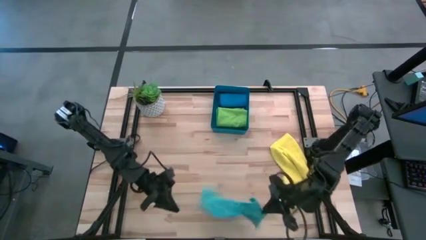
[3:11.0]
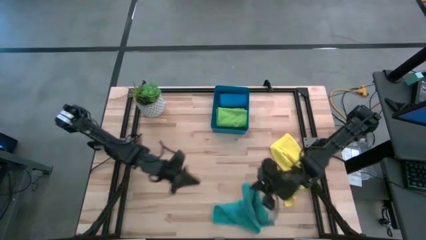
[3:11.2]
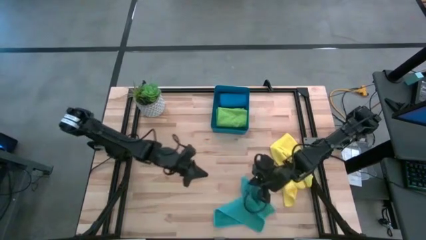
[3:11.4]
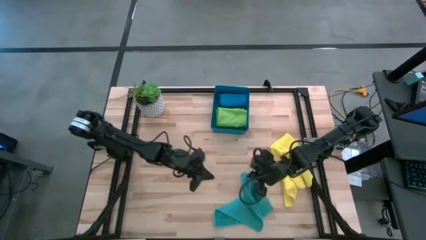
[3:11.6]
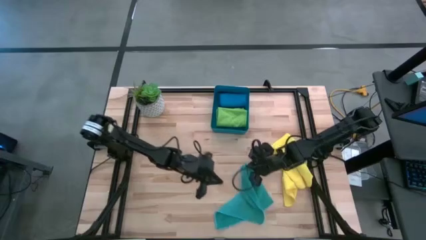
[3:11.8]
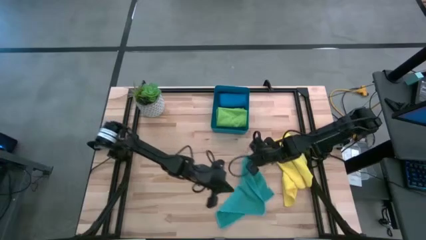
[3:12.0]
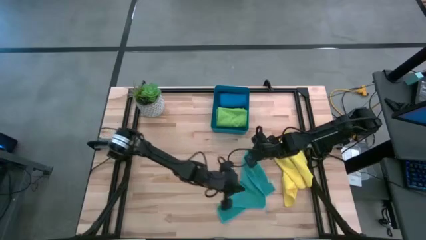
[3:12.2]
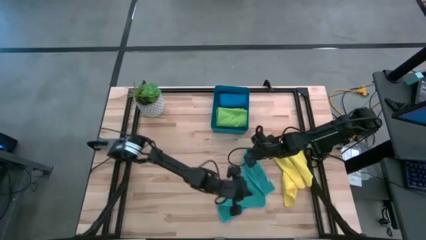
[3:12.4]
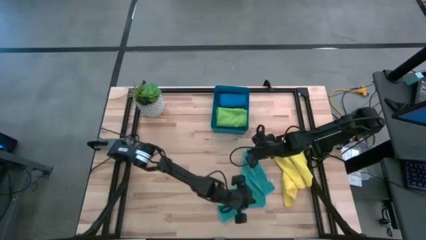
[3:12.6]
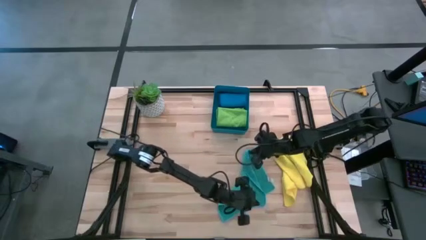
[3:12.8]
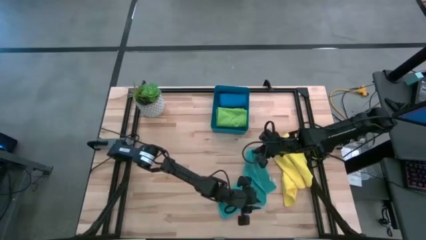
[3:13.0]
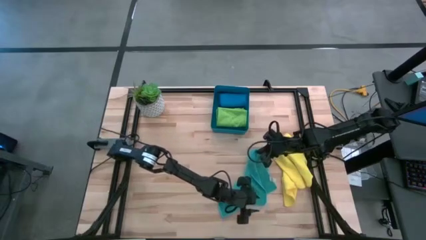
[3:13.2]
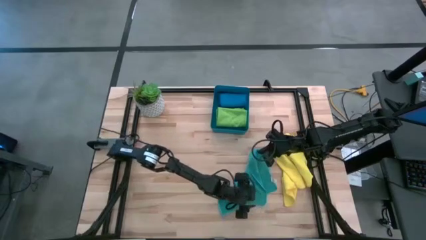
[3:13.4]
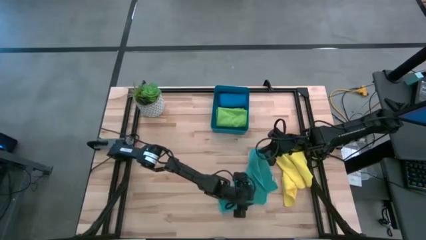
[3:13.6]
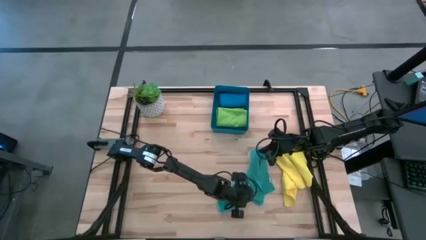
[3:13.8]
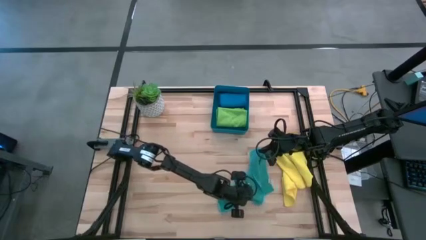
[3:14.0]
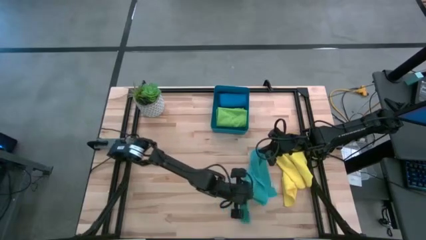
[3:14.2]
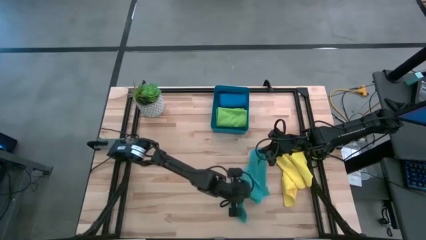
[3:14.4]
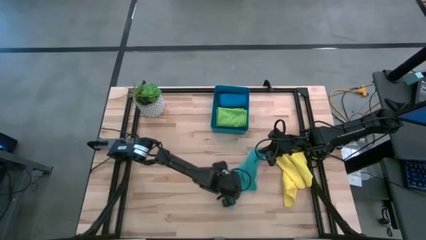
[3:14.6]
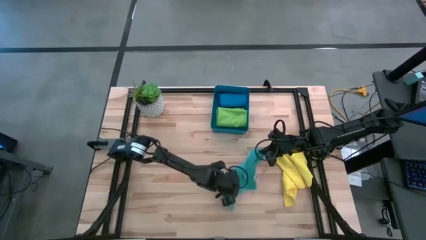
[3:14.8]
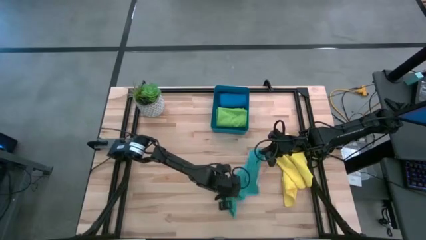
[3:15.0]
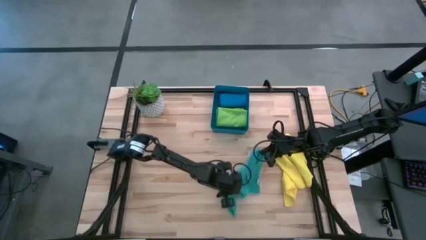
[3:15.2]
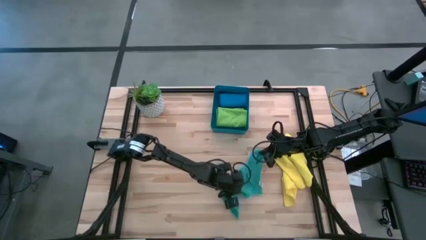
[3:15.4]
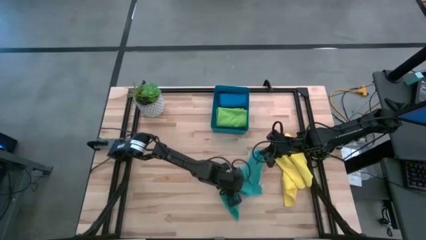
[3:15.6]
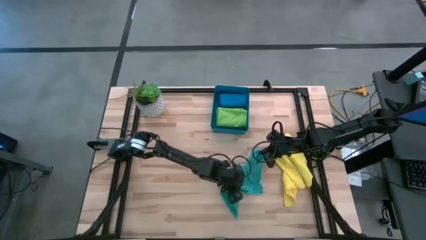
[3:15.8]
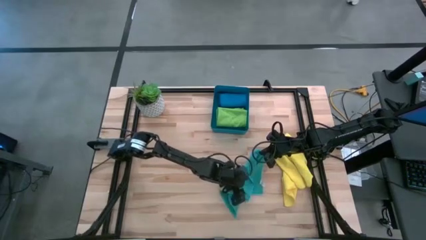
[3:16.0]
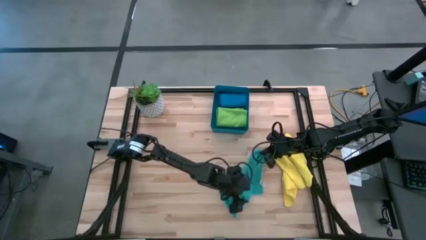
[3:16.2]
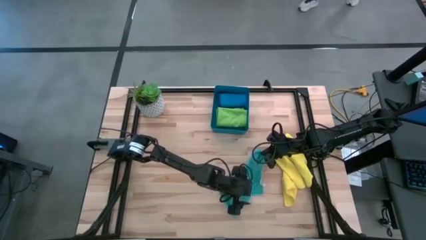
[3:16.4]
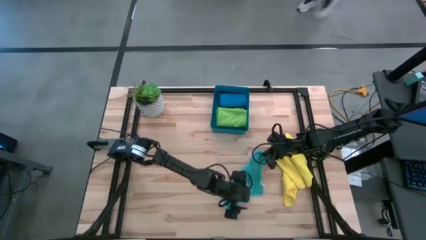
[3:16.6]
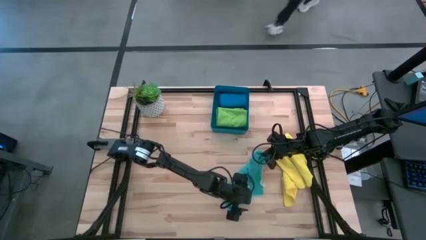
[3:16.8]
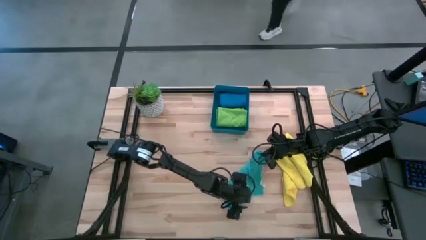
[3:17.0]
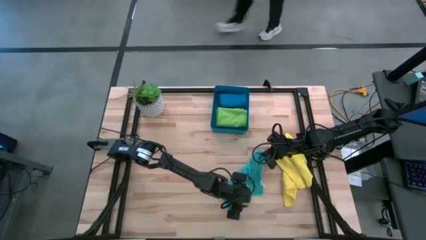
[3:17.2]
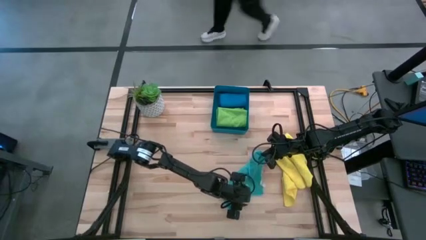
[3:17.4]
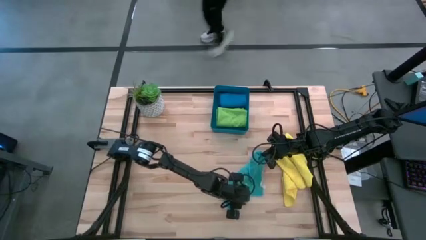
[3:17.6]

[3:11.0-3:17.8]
Task: Fold microfiber towels
Fold the light blue microfiber cloth

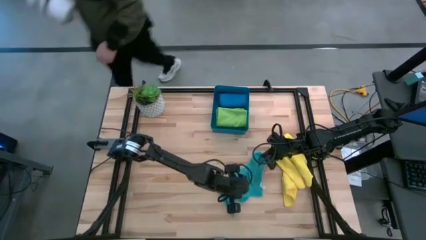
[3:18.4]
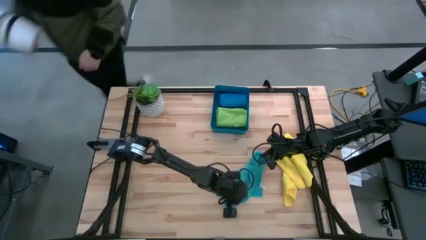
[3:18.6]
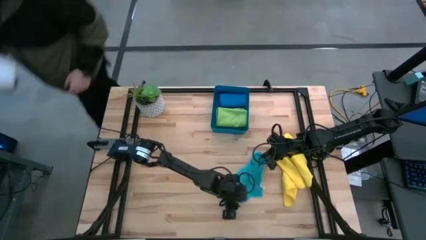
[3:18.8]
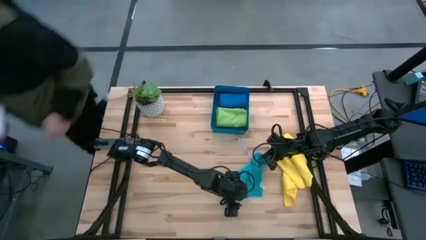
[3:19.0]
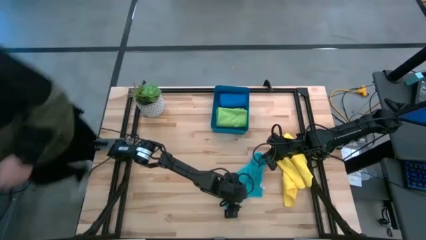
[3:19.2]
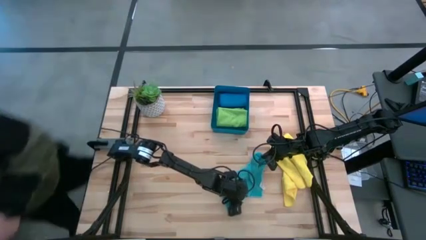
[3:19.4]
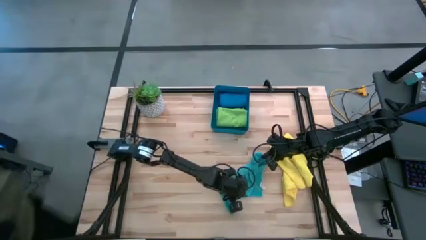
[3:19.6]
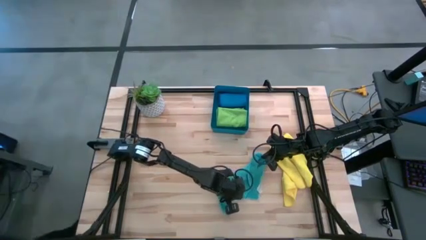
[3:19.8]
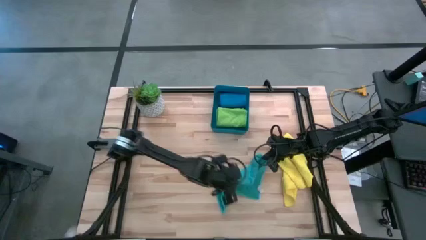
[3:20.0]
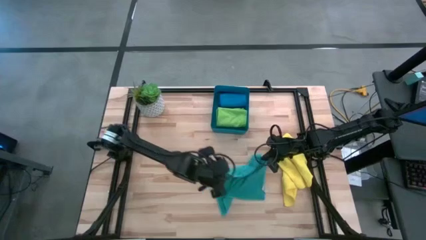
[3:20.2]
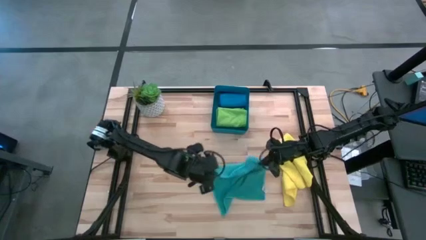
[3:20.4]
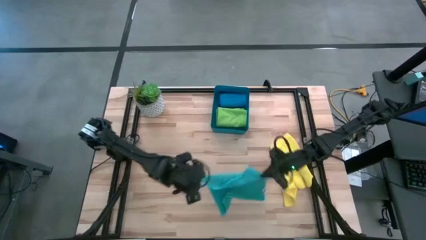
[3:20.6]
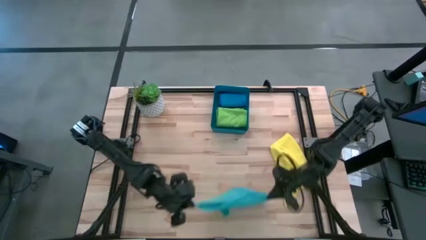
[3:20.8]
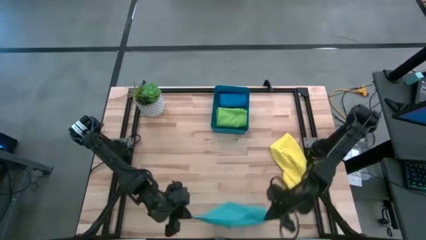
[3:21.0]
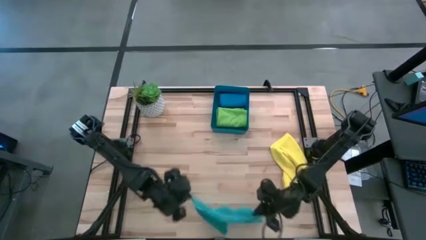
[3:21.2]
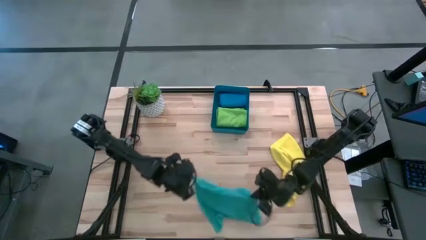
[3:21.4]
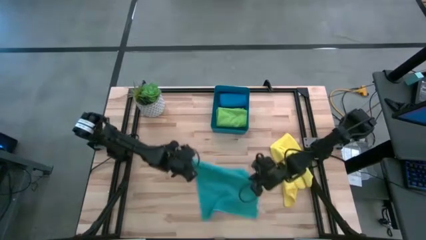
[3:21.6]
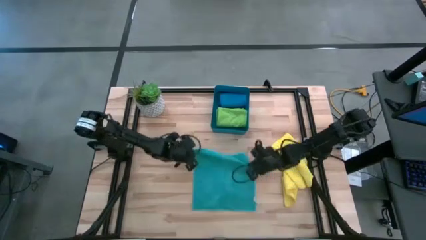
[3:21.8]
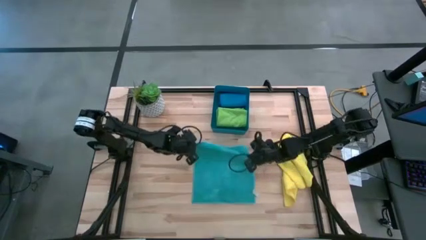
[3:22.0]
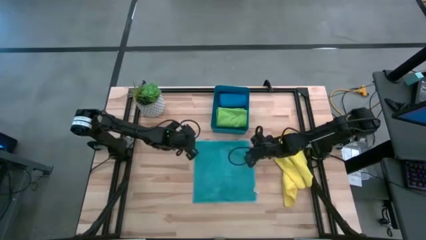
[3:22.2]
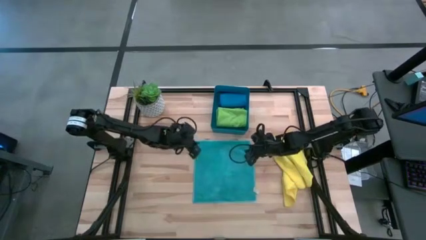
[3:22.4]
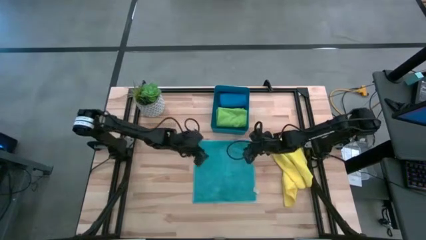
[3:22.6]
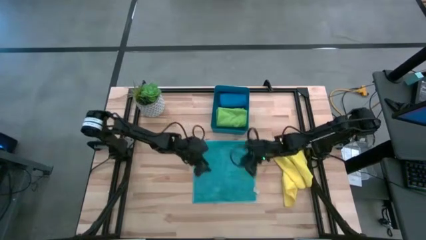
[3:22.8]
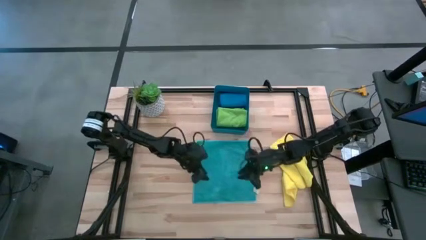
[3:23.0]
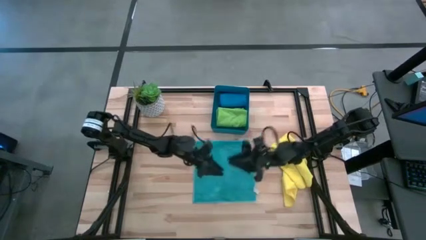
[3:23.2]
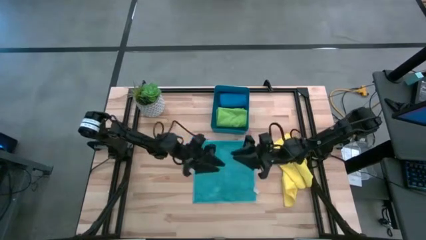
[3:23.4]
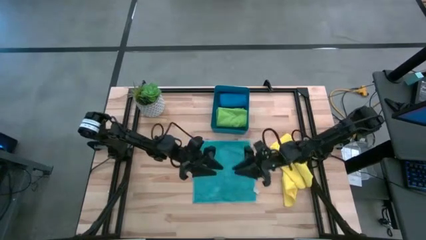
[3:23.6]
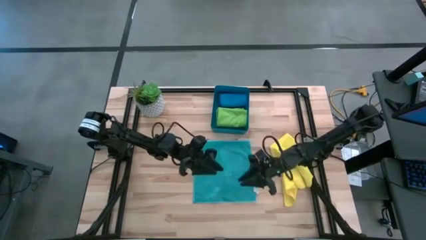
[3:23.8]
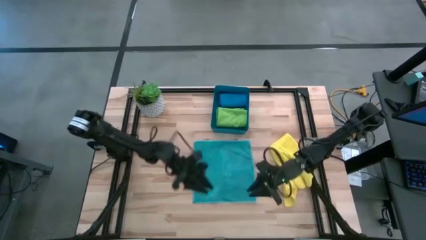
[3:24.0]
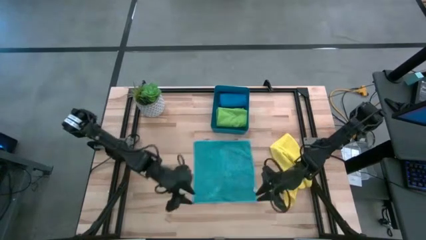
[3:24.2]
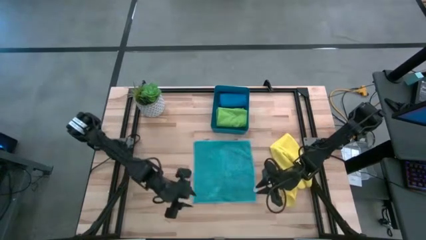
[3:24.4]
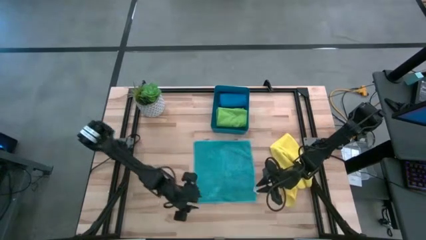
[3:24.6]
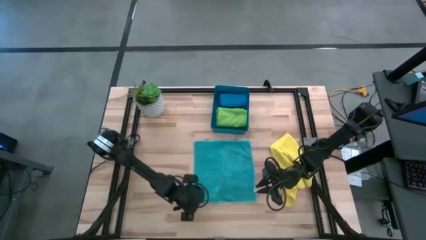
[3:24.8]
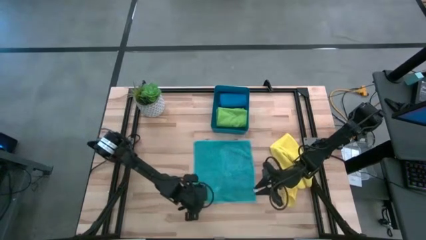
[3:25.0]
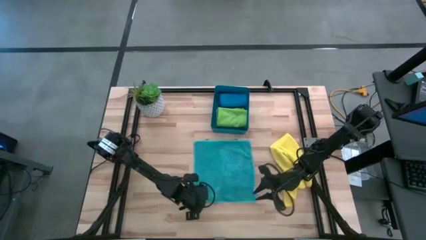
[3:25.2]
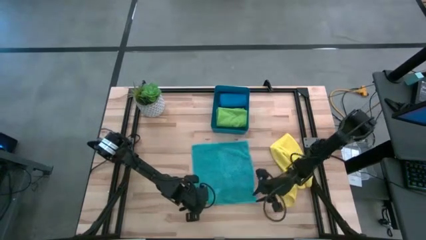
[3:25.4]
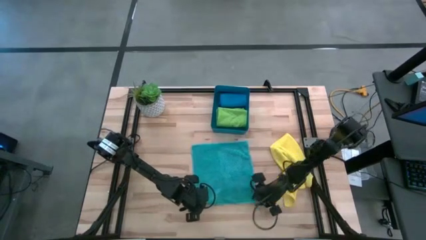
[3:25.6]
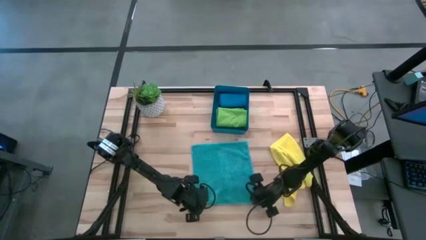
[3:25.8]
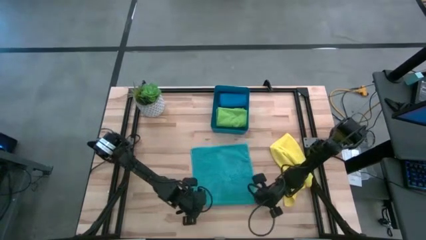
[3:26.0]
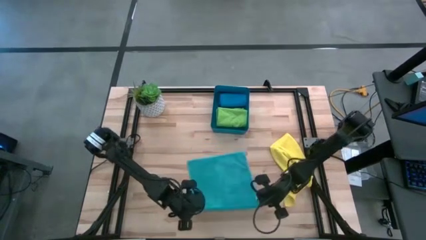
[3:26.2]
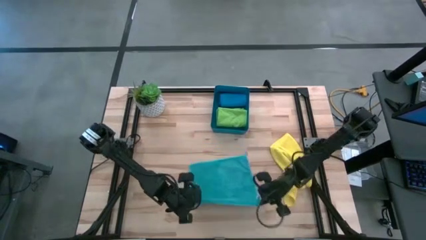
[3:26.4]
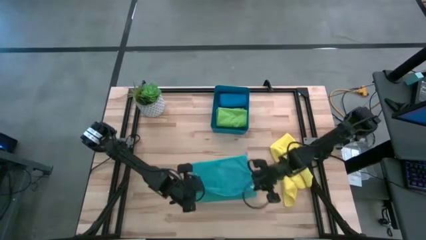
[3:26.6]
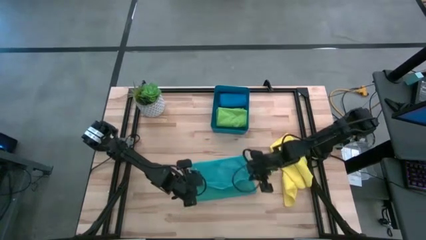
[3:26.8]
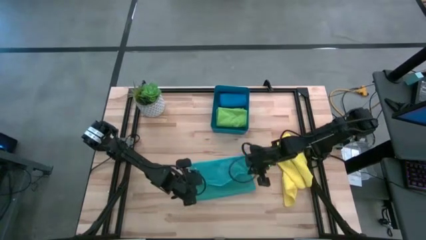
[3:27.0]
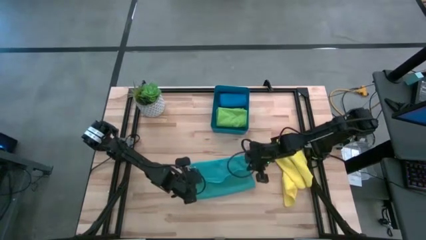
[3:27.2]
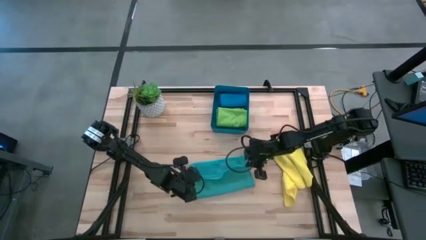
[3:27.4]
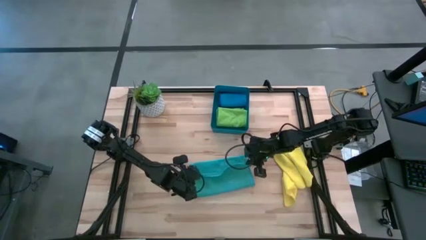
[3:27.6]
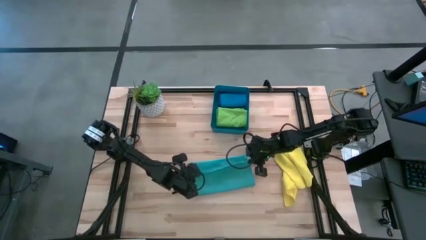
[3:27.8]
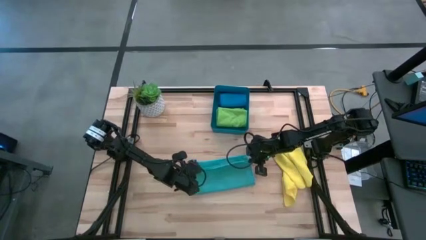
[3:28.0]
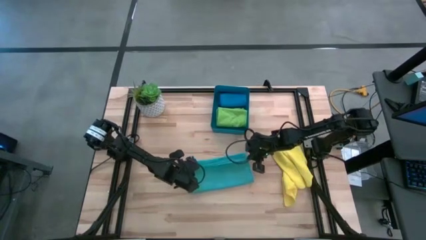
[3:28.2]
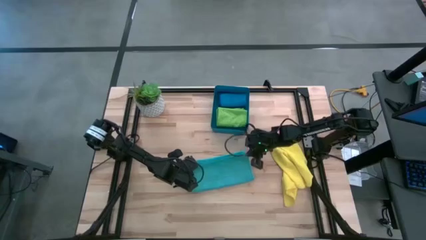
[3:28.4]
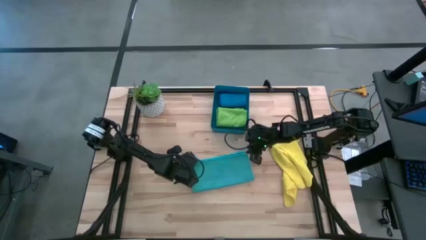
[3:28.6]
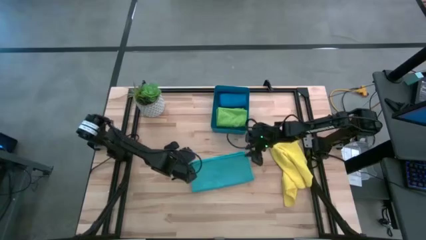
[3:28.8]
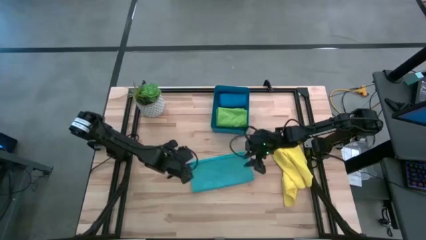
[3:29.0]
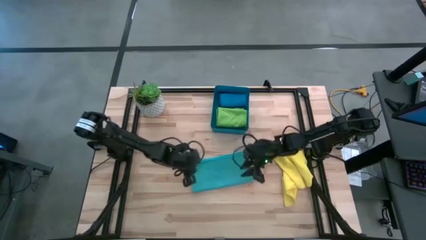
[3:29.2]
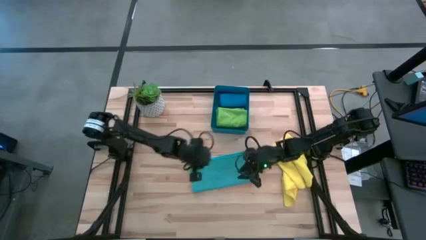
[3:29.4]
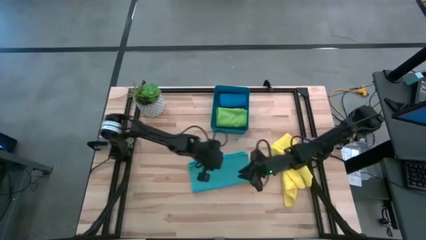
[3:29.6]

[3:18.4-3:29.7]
Fold the light blue microfiber cloth
